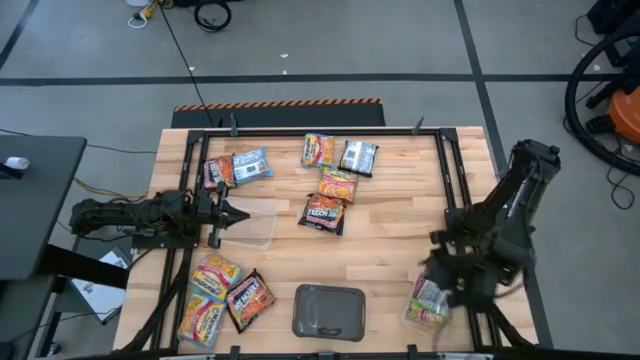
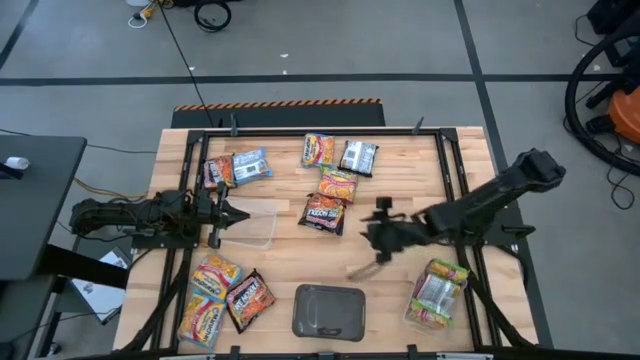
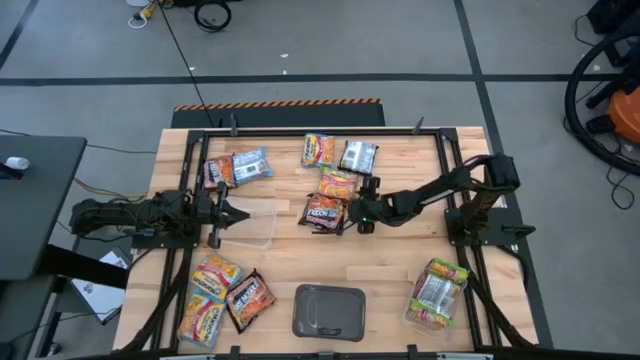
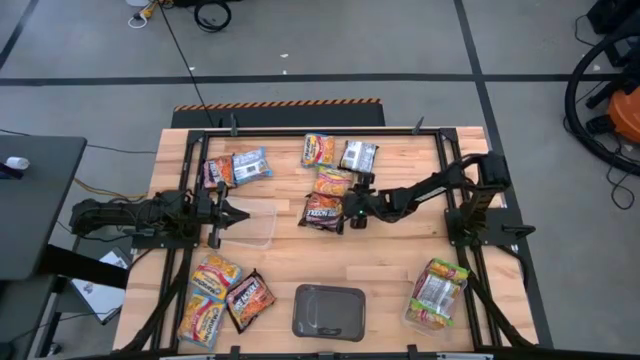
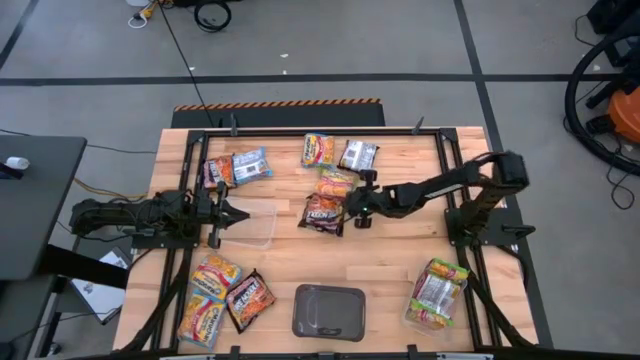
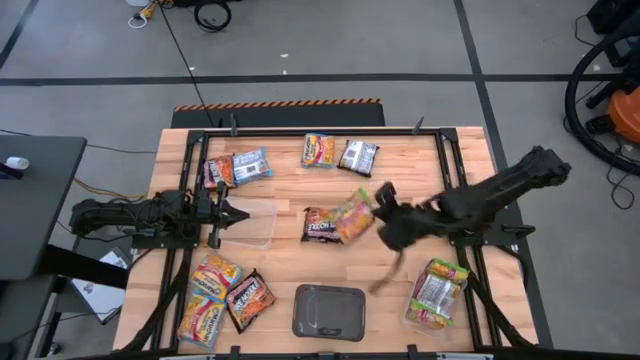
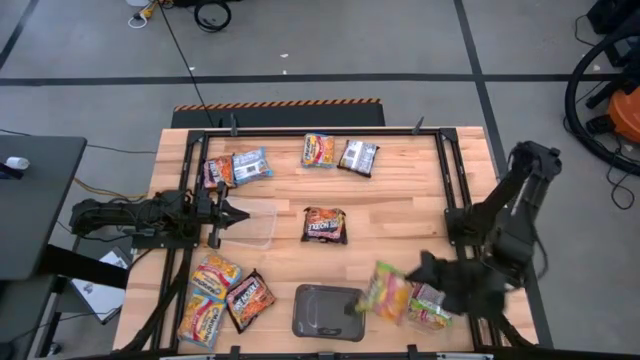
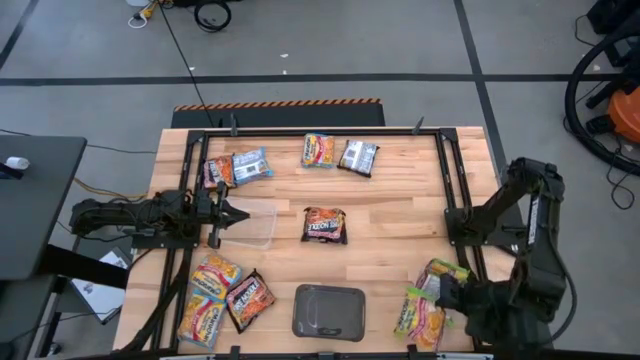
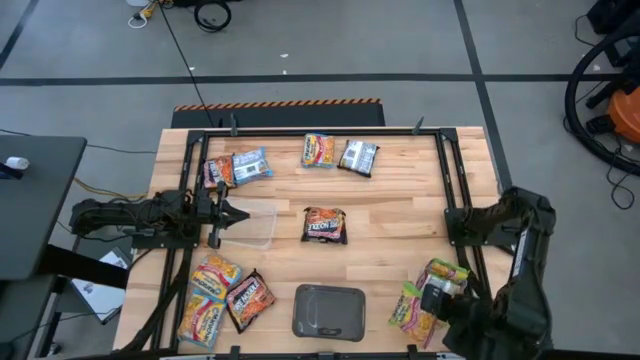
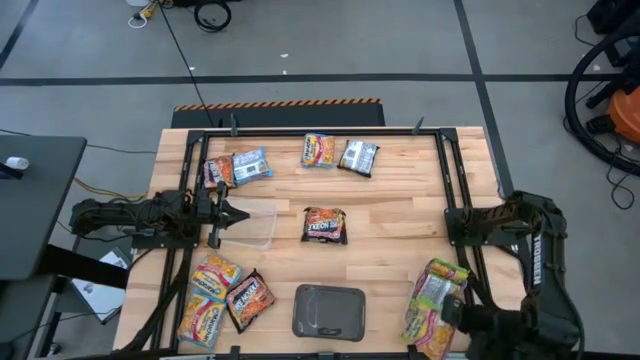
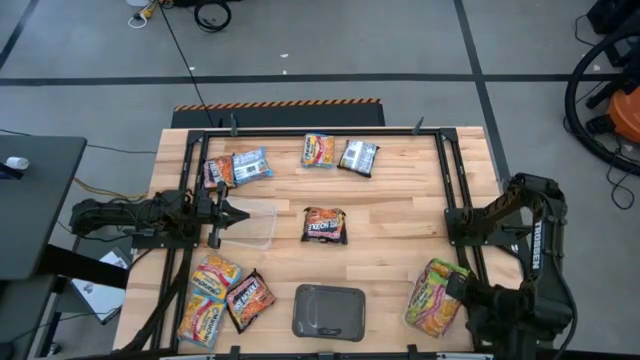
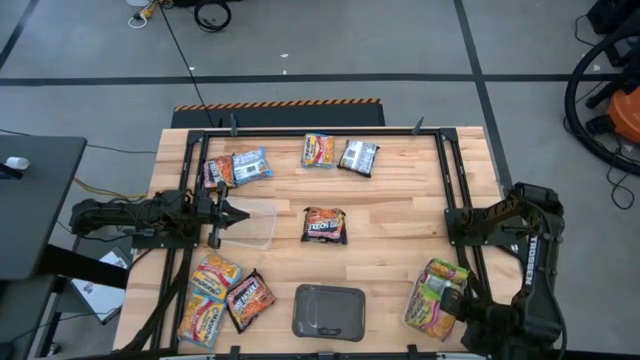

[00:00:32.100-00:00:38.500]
Task: Sort Maruchan noodles
Put the green noodle pack into the bottom transparent bin

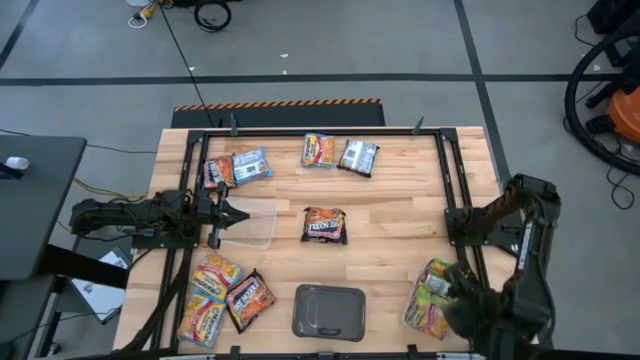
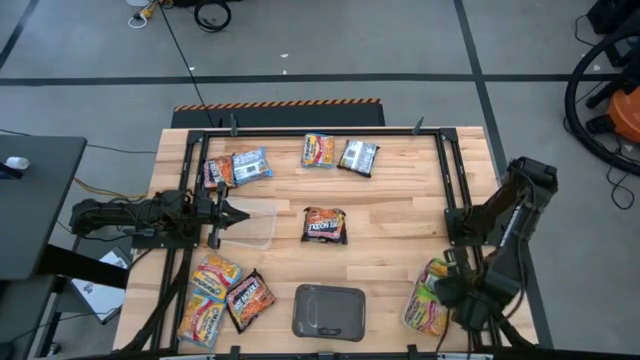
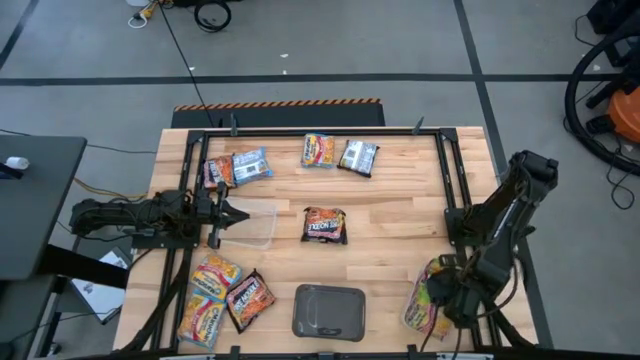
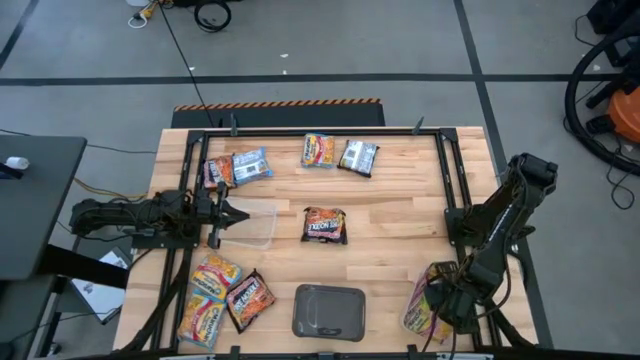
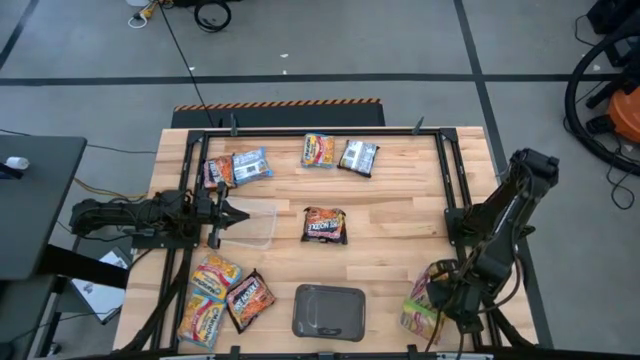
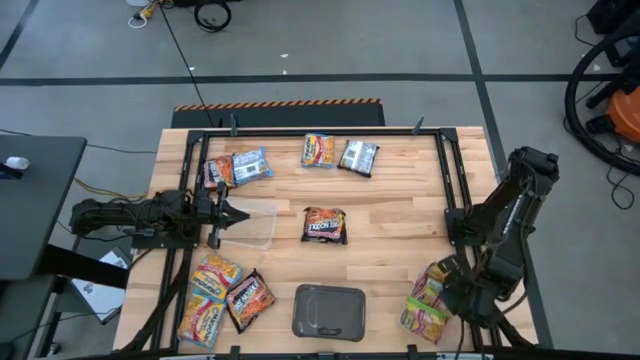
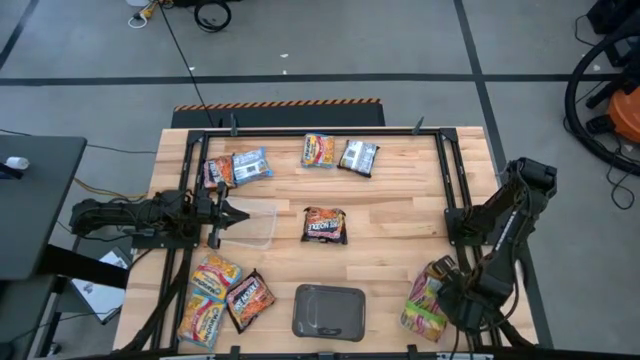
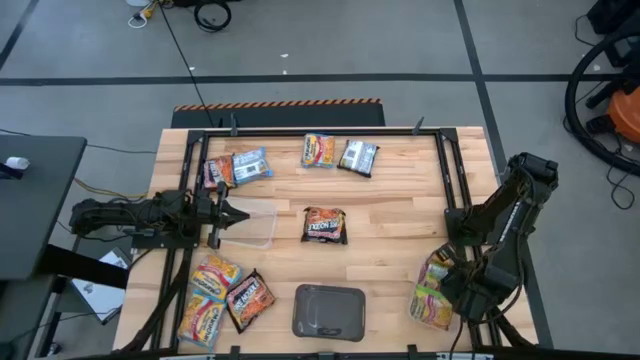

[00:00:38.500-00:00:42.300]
Adjust the green noodle packs in the bottom transparent bin

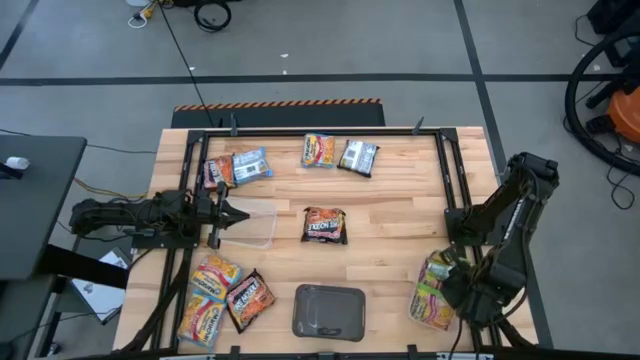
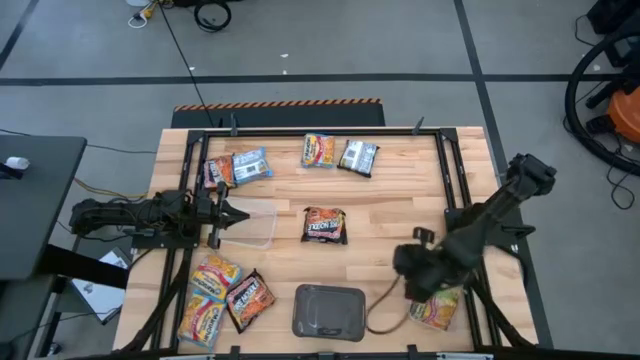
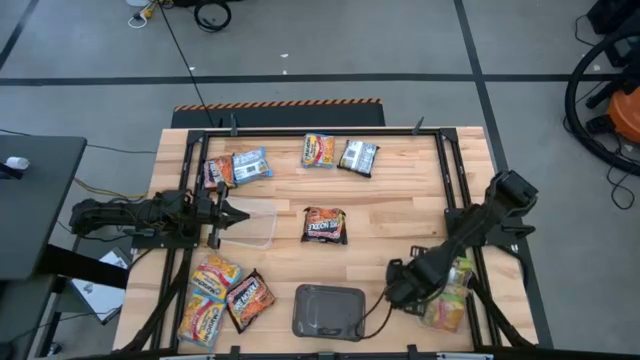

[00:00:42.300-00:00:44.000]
Adjust the bottom transparent bin

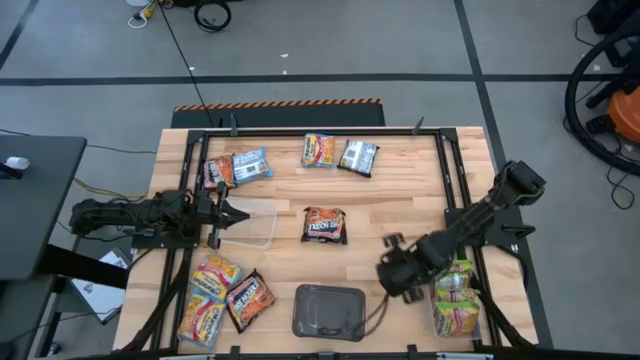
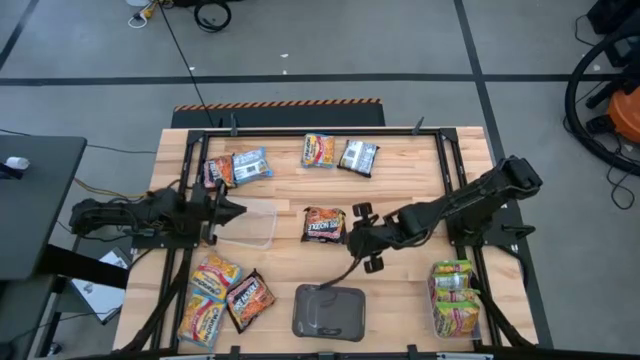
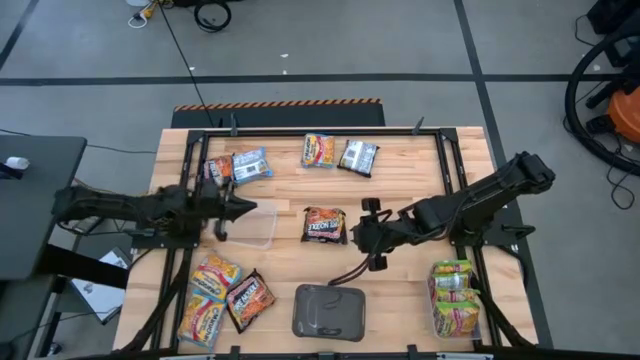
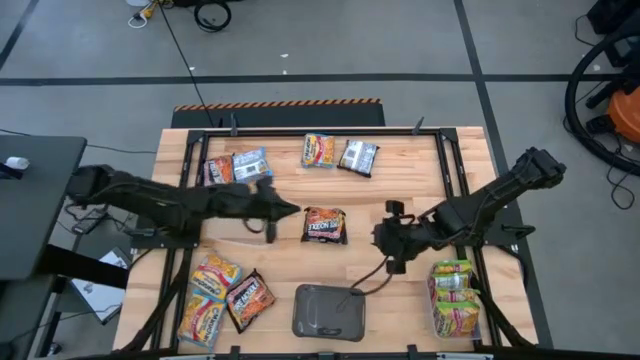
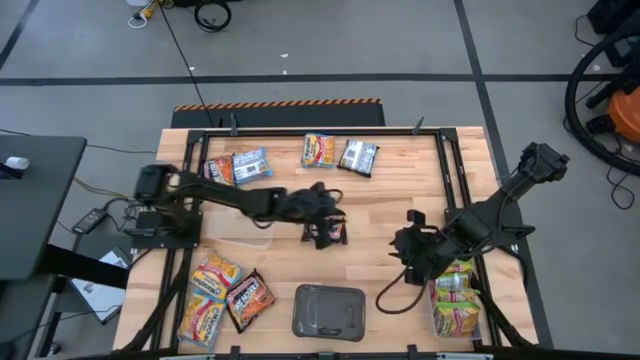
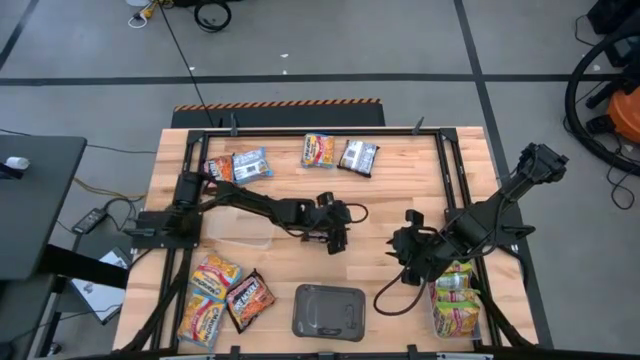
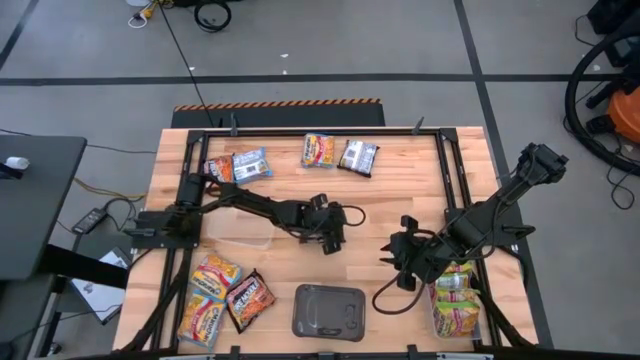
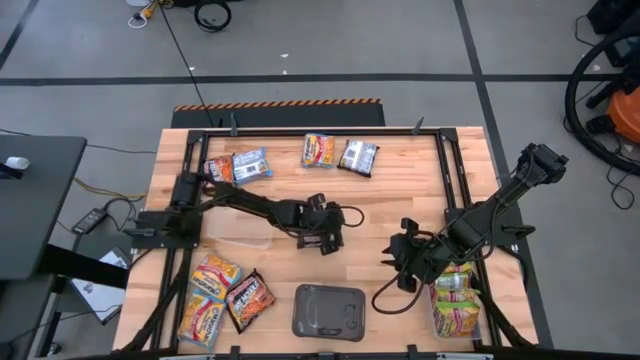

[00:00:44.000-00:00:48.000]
Put the black noodle pack into the black bin

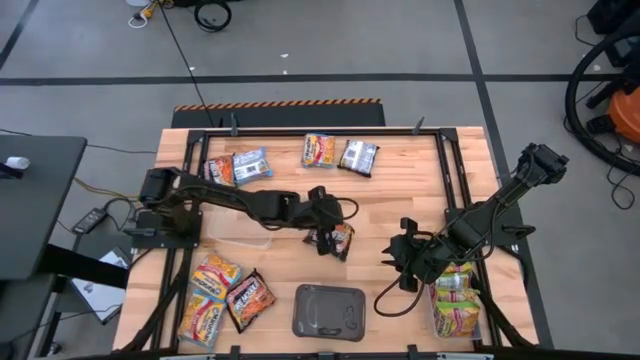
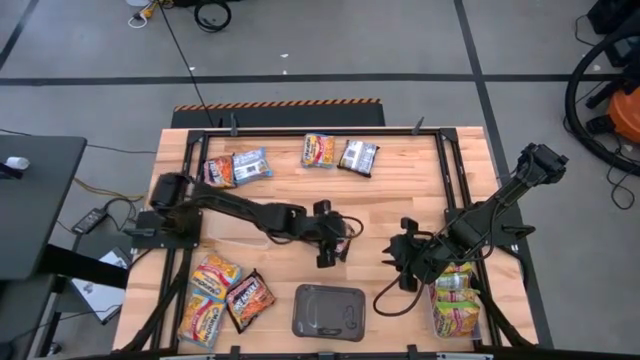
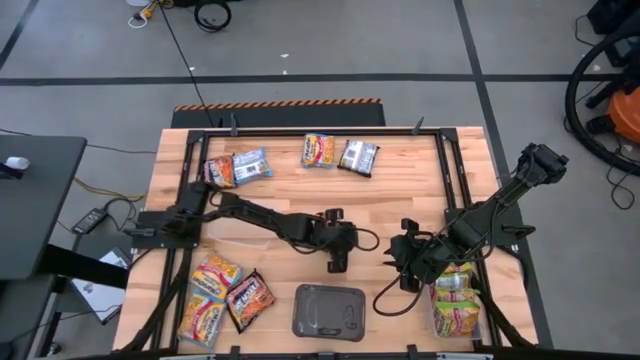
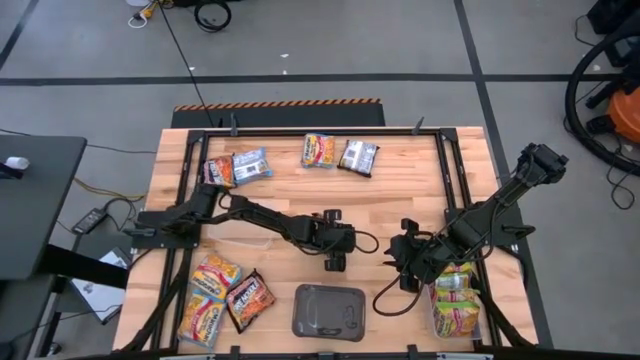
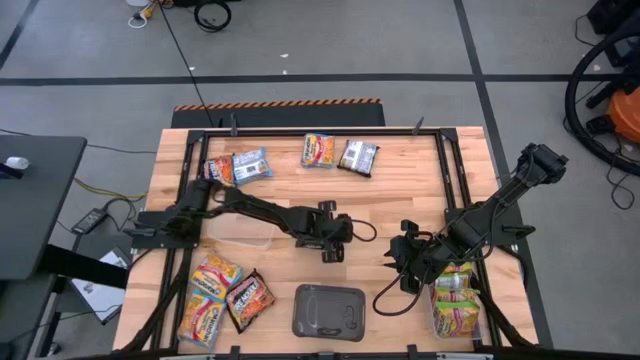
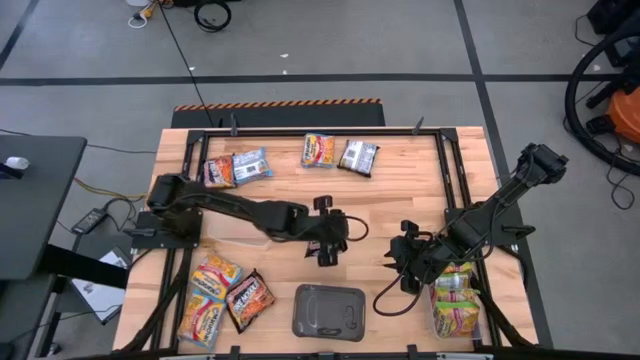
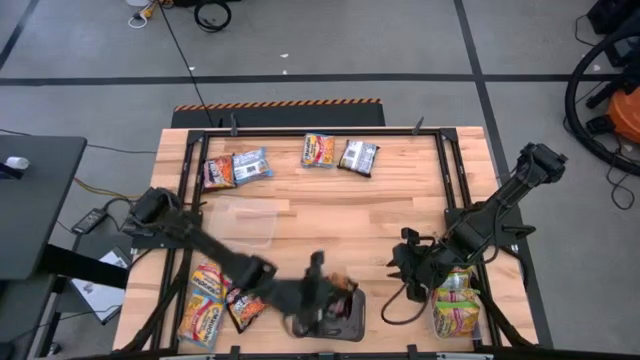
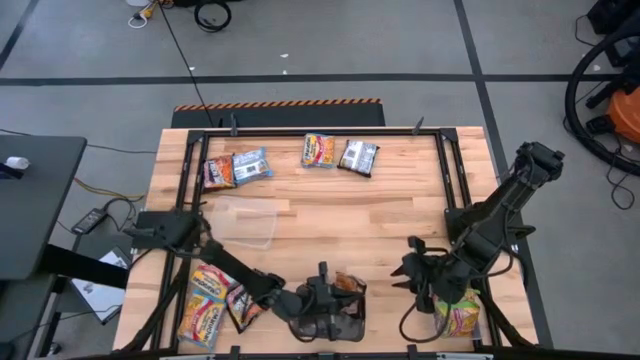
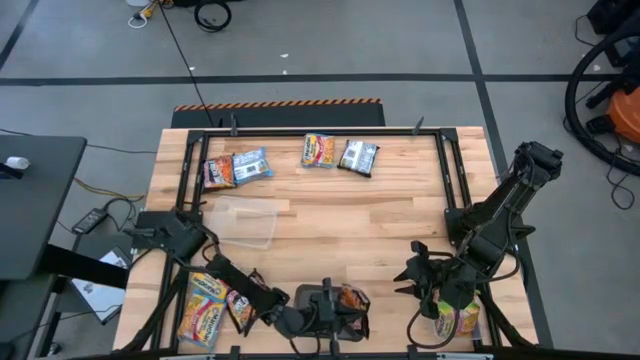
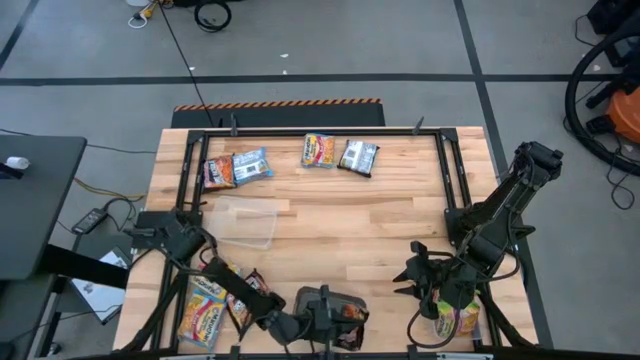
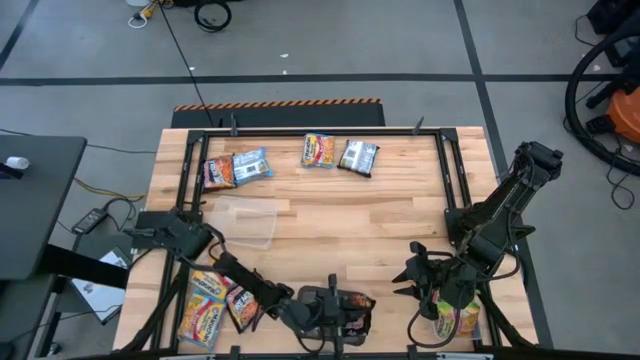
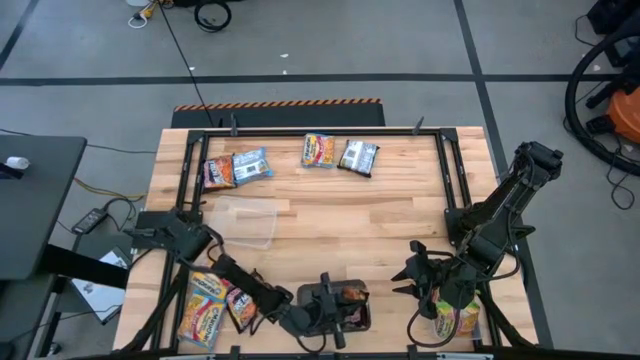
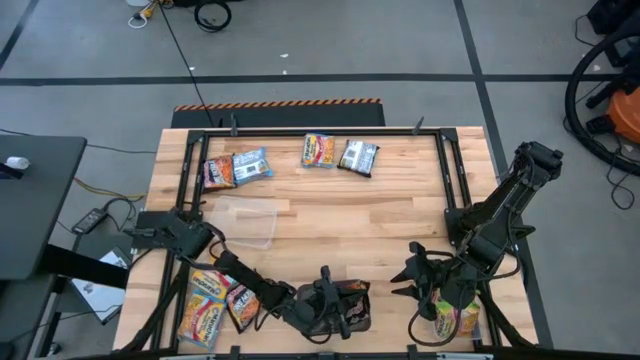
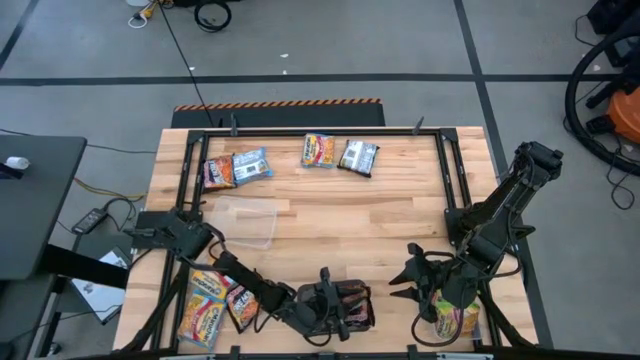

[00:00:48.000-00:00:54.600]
Put the black noodle pack into the black bin
